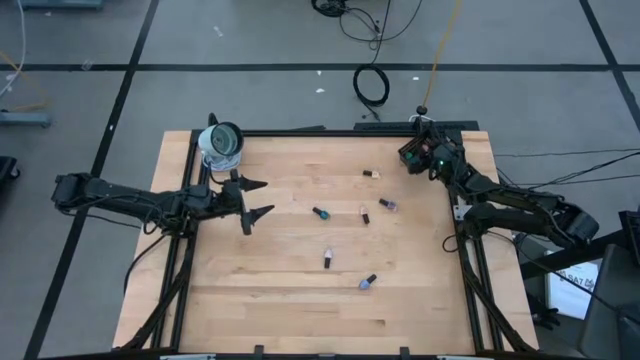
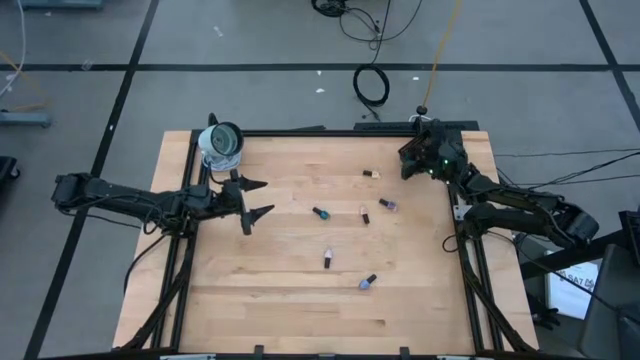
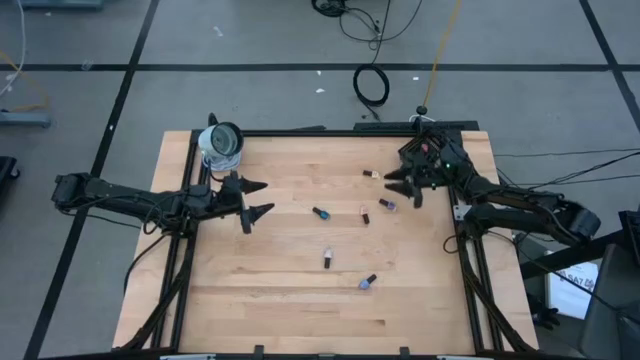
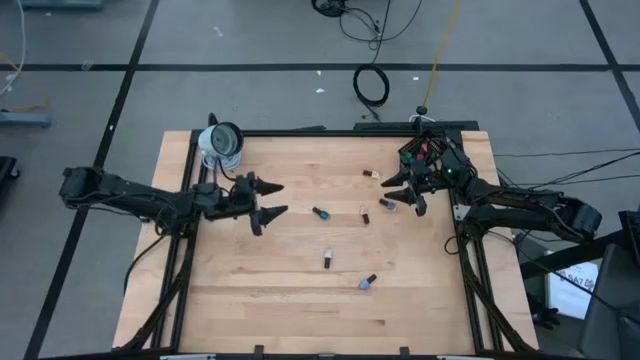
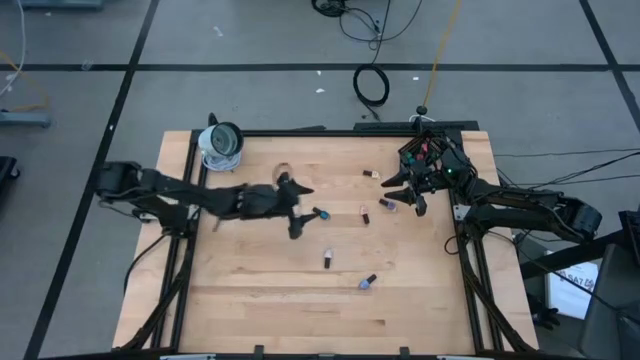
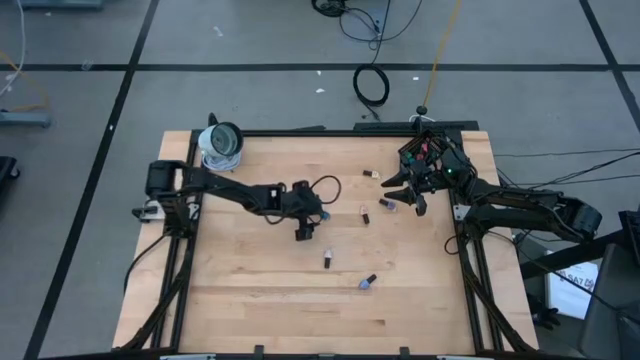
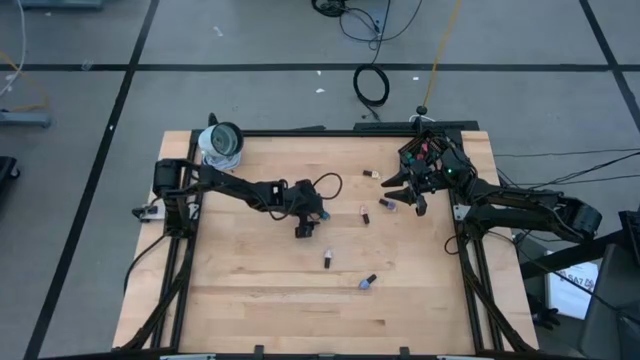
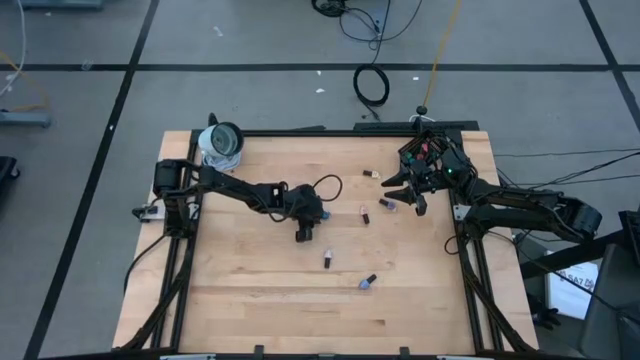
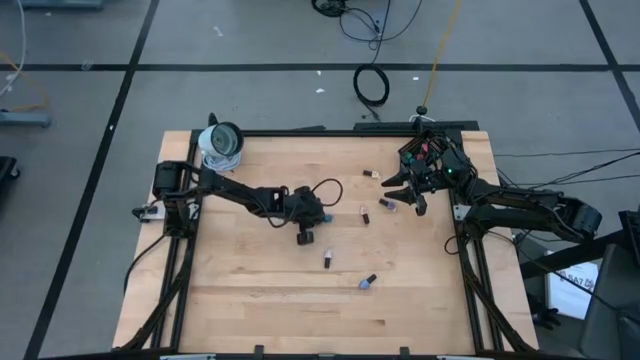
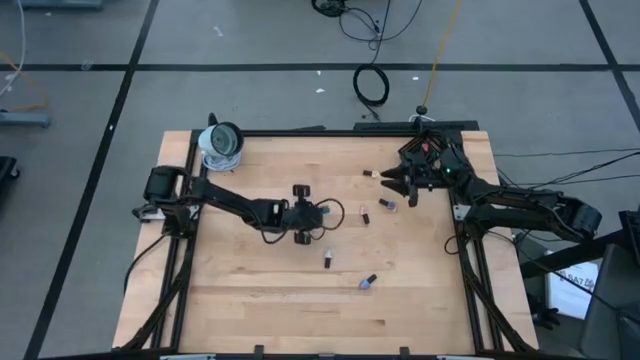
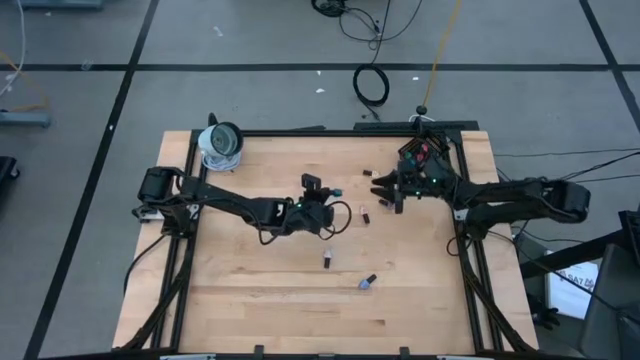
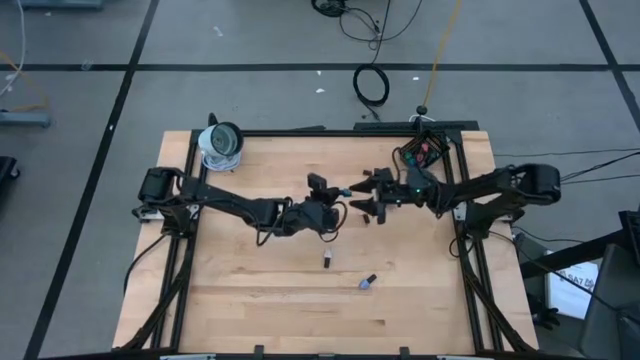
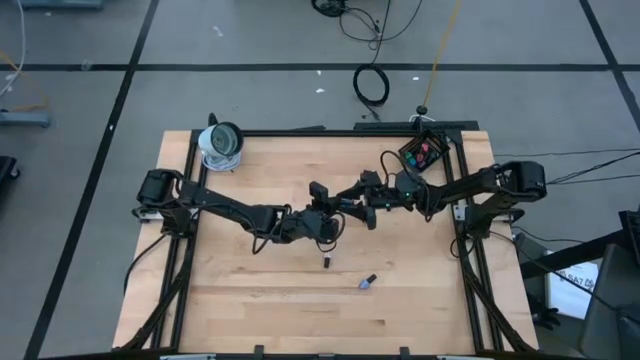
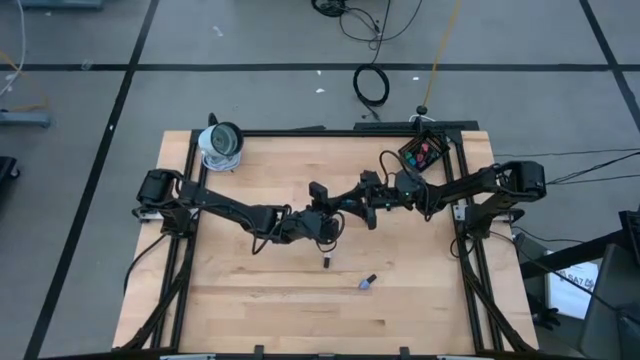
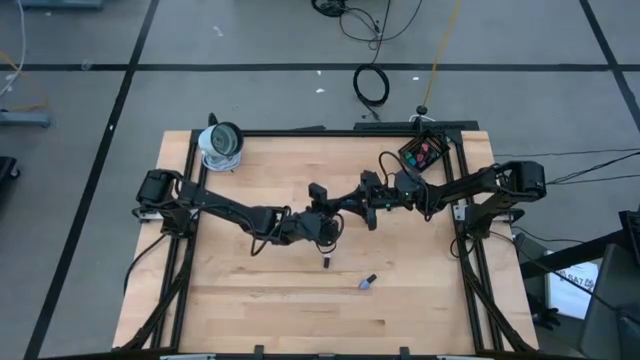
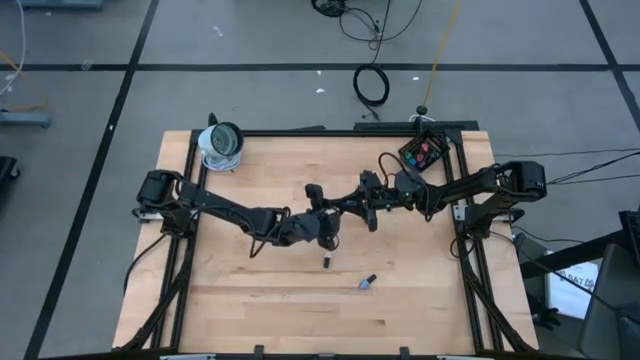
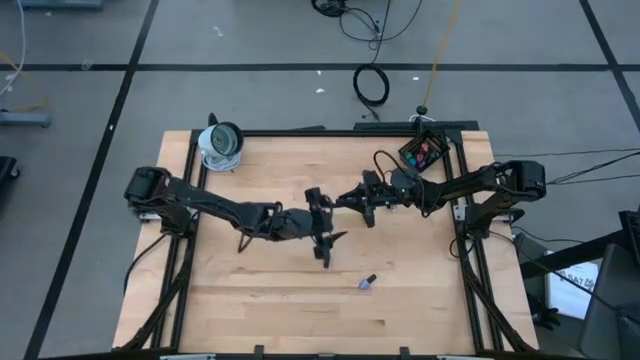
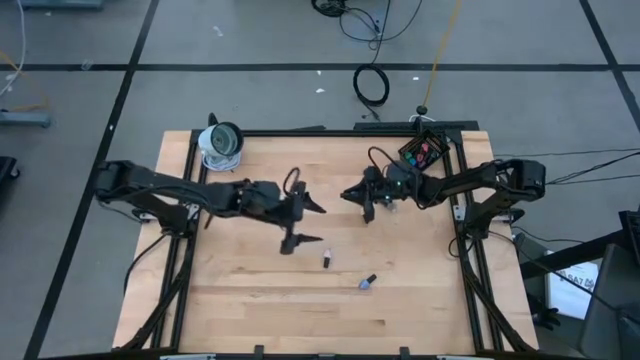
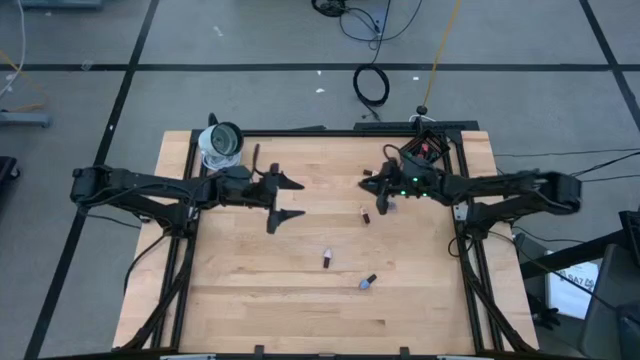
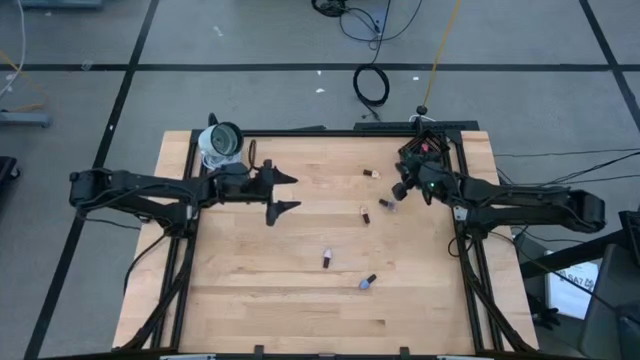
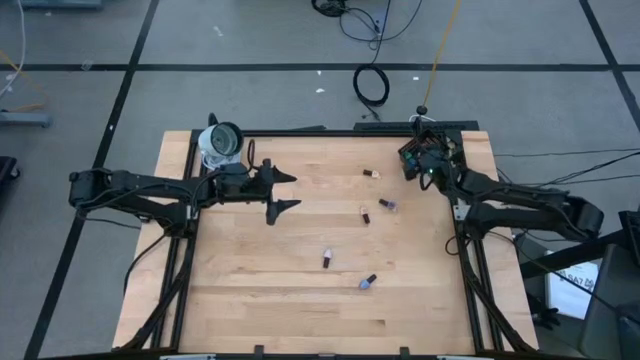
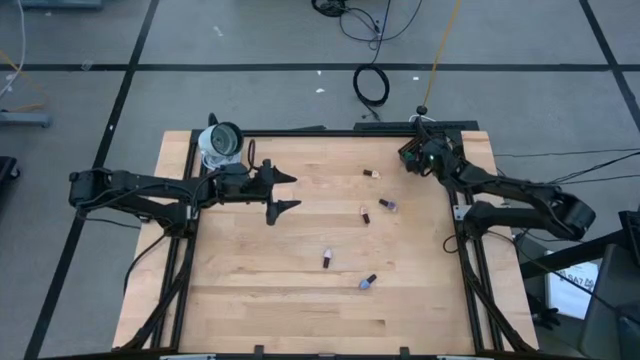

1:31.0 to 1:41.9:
Task: Pick & Place Nail Polish
Put the silver blue nail polish into the black bin

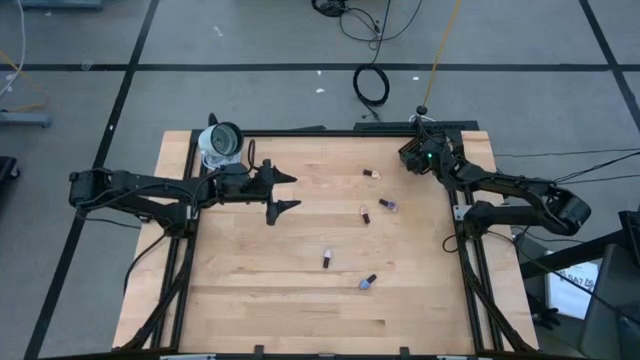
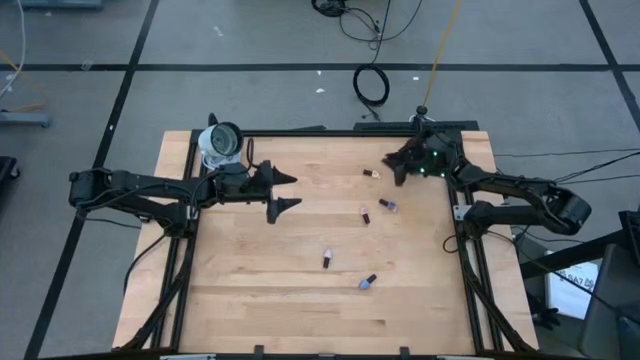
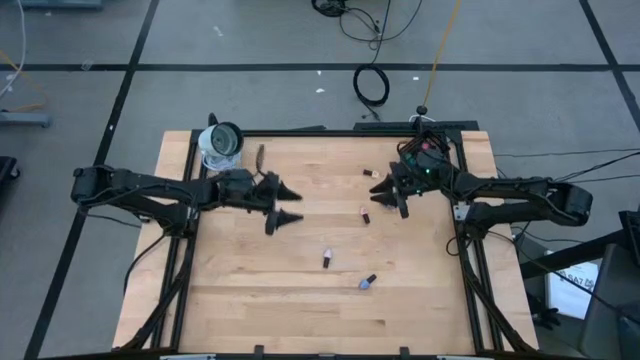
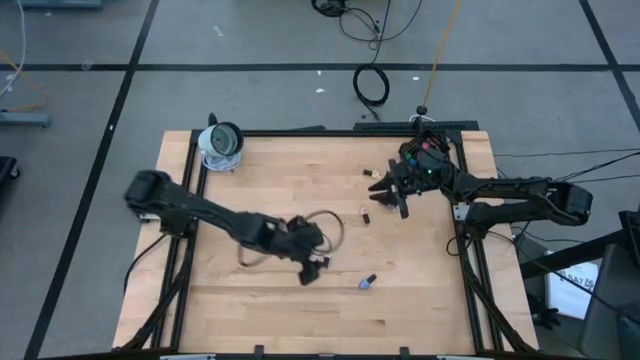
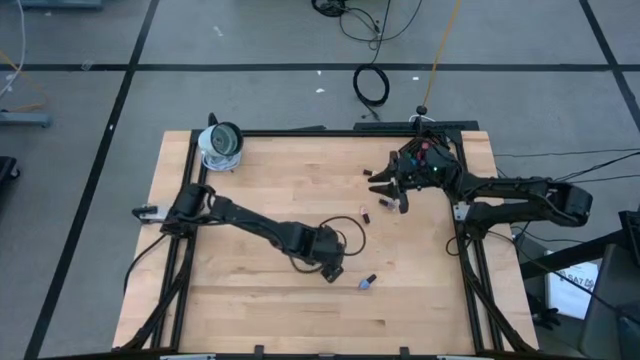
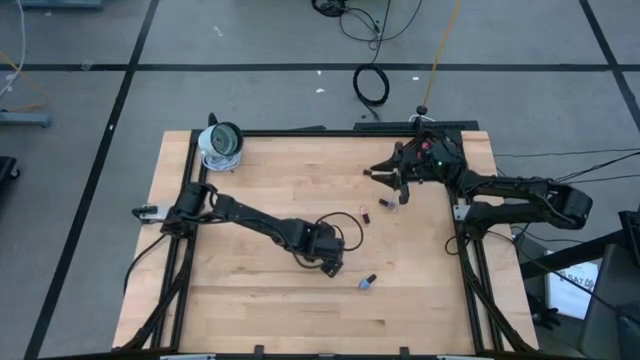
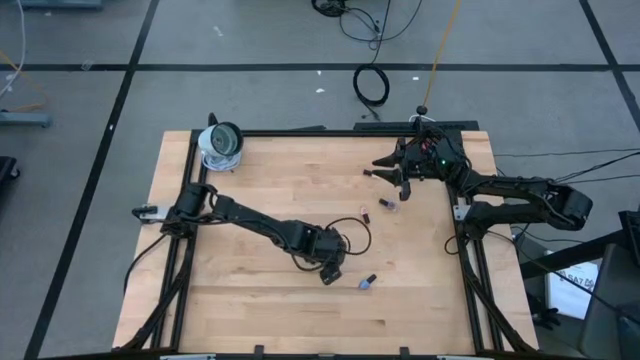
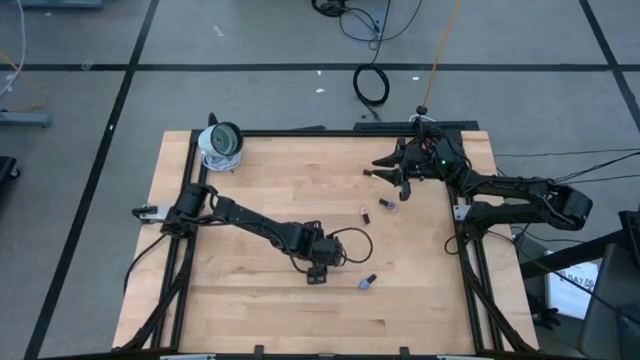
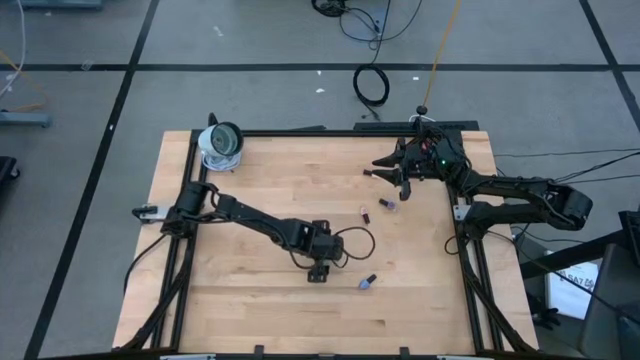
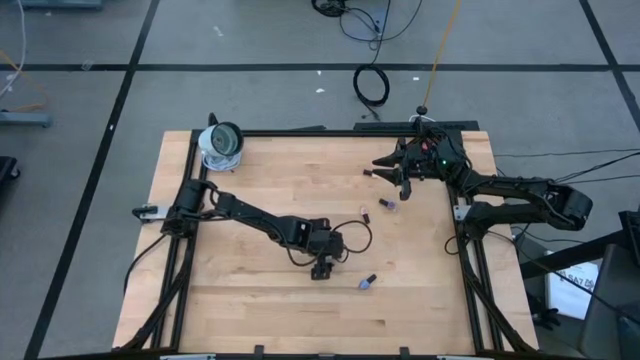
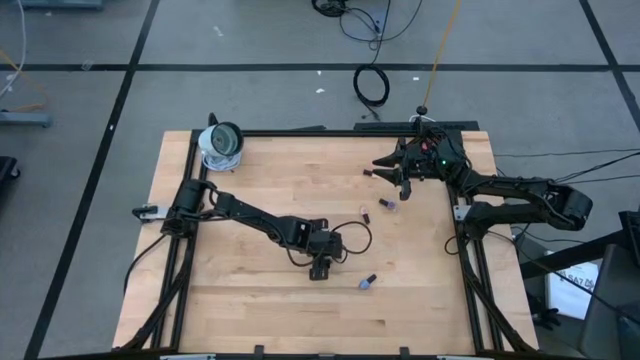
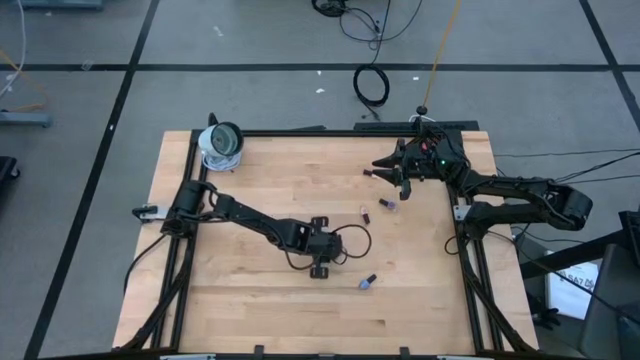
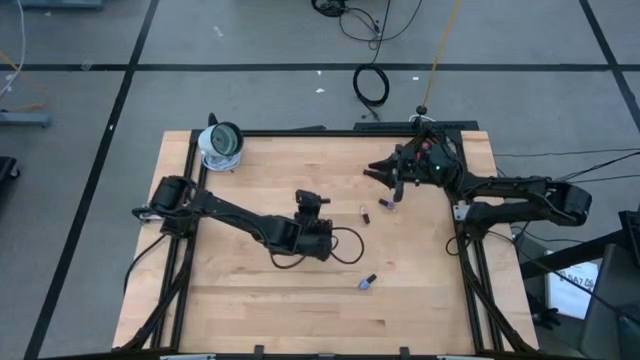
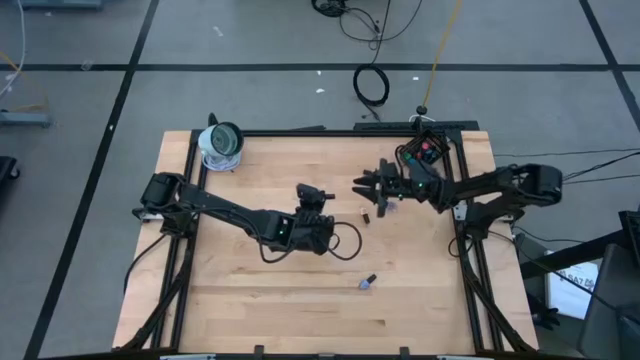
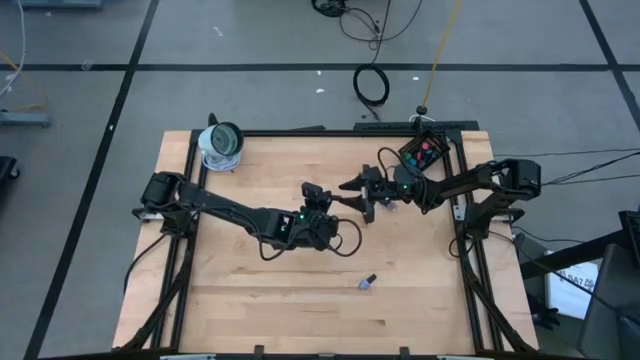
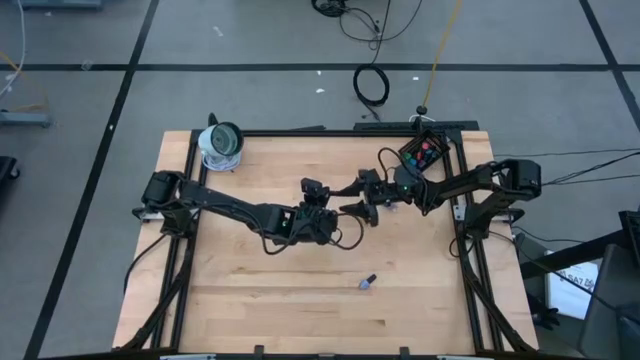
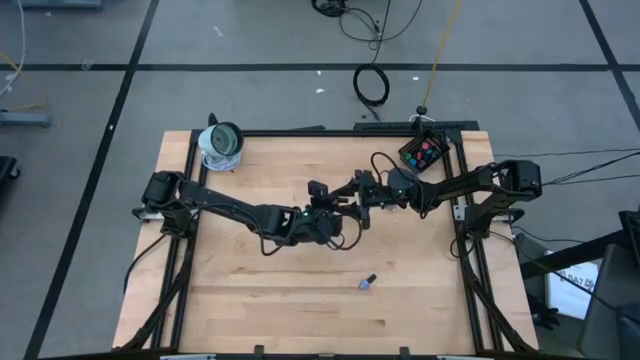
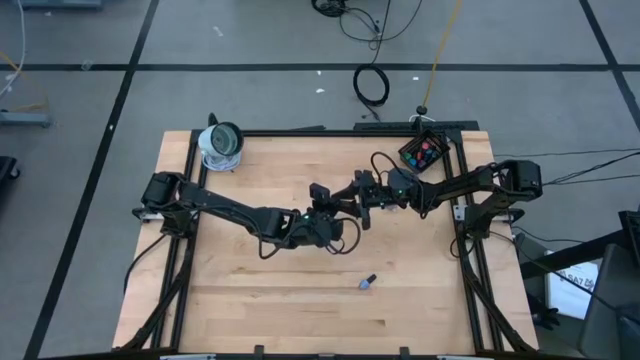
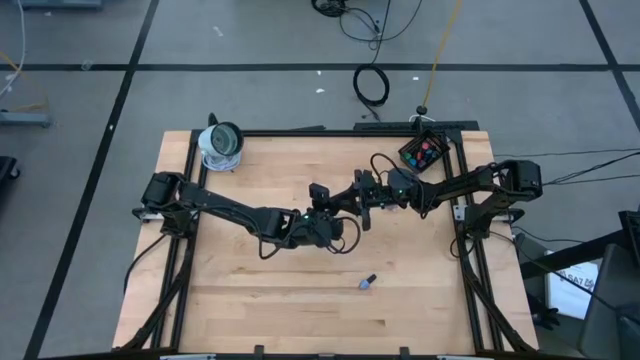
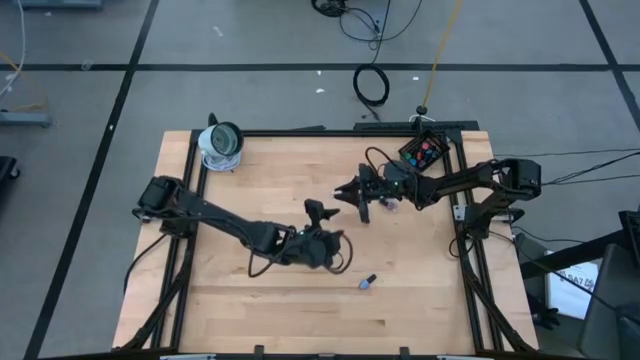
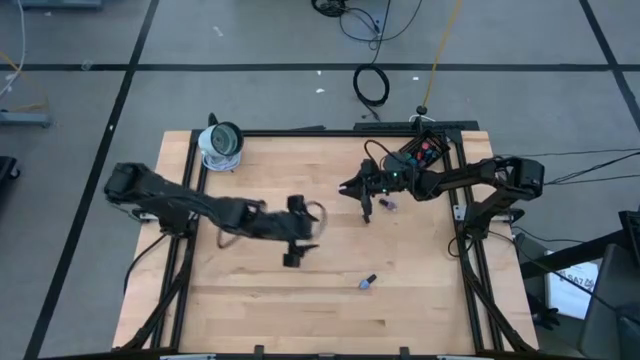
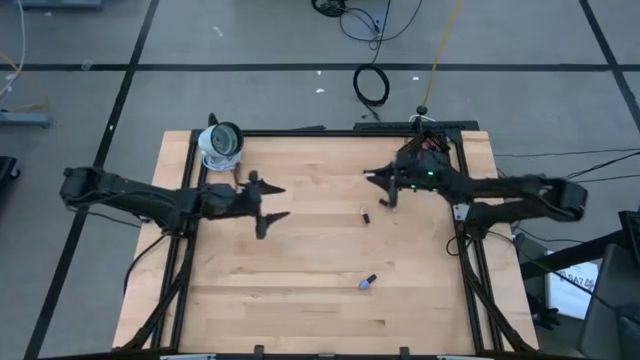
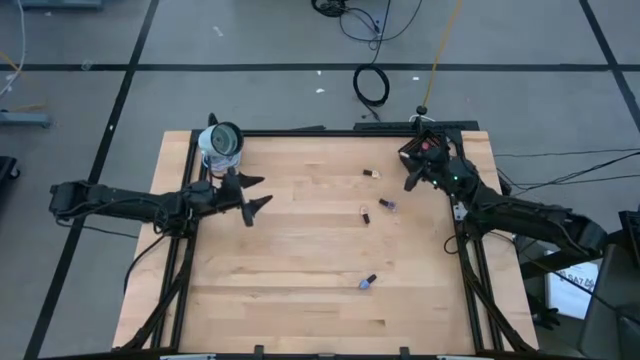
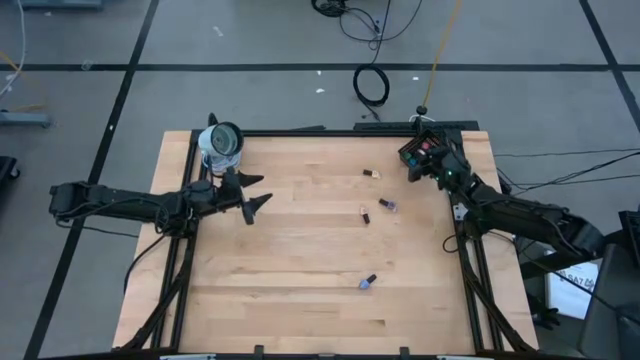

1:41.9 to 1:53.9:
Put the white nail polish into the black bin

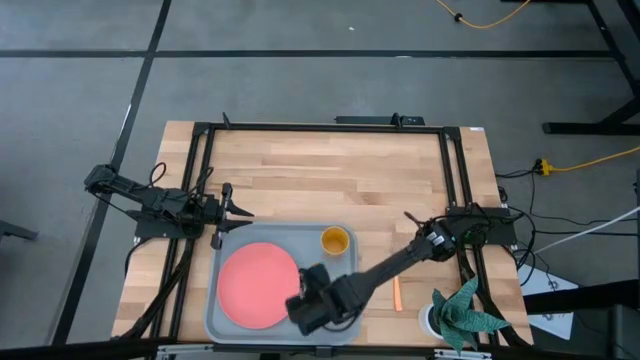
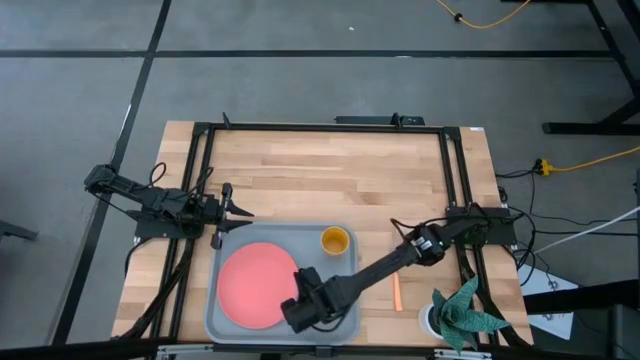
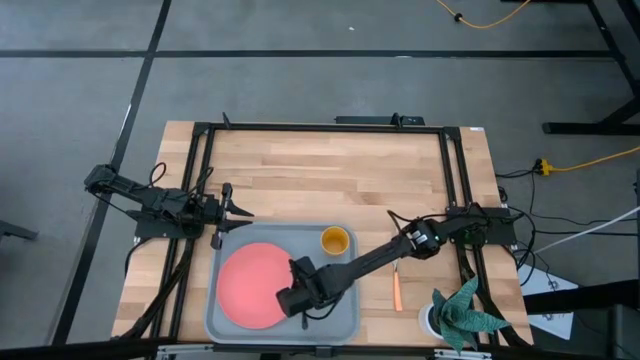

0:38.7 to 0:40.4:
Task: Pick and place plate/cup/fork/spoon on tray
Adjust the pink plate on the gray tray
